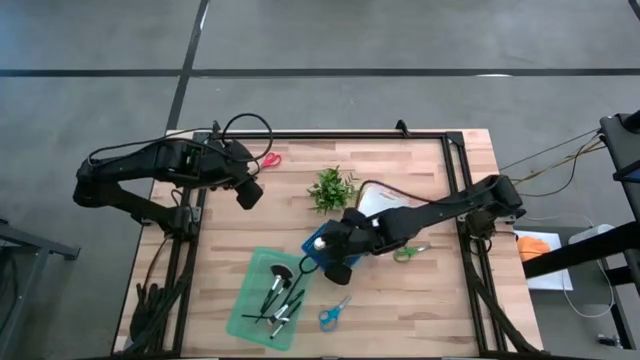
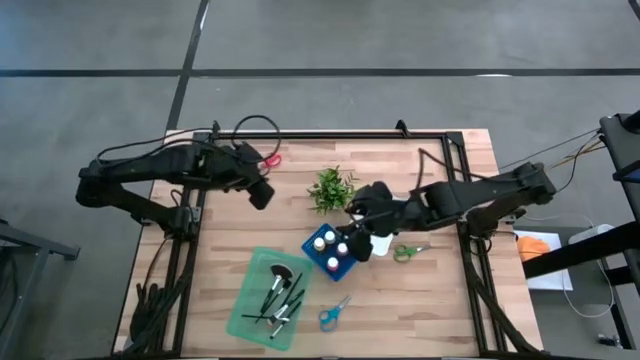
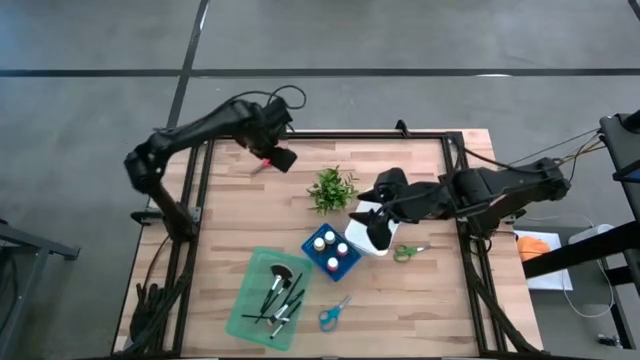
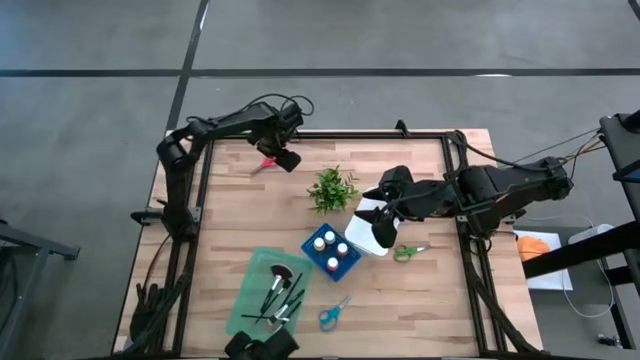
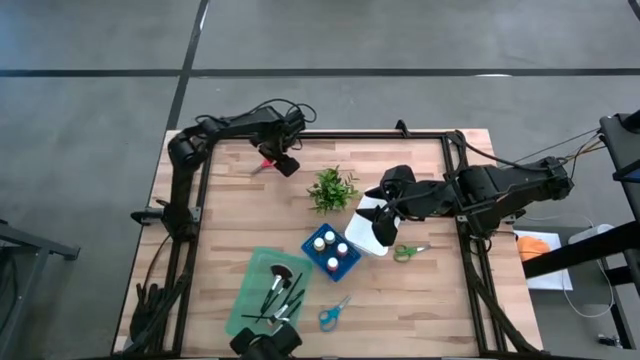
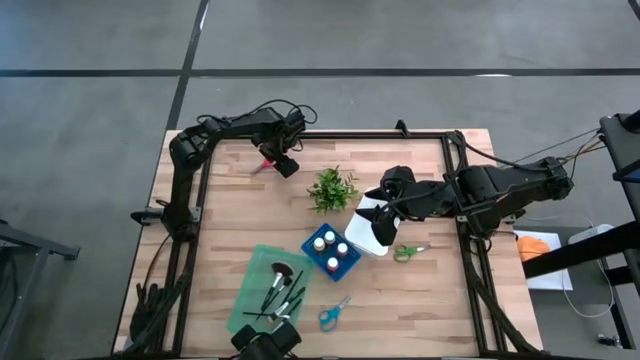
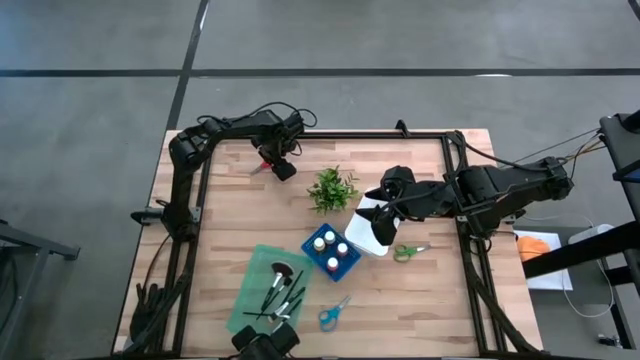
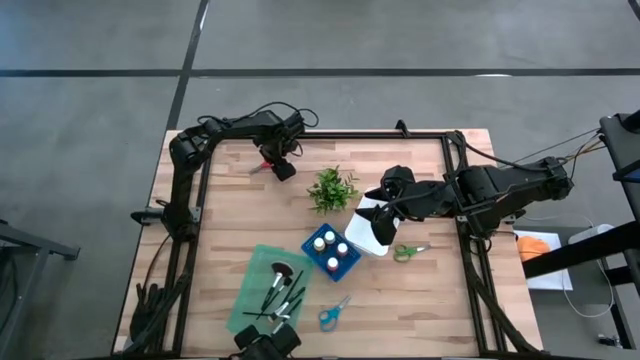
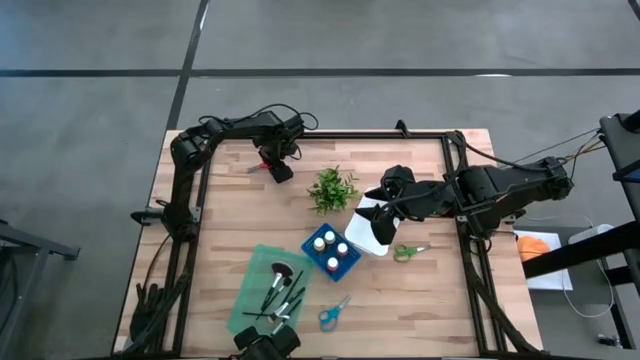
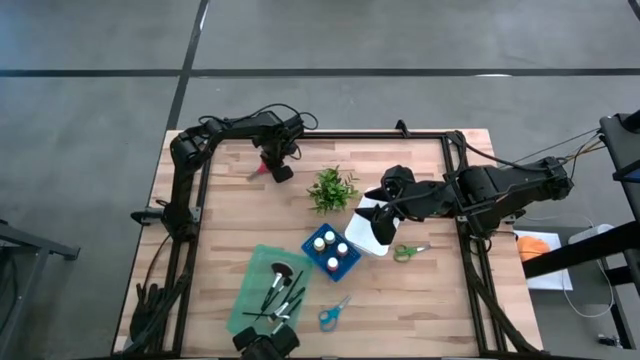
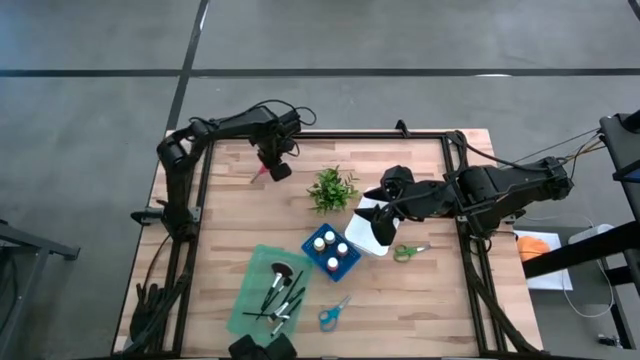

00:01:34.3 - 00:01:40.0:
Task: Pick & Place Paint Supplies
Put the orange scissors into the white bin

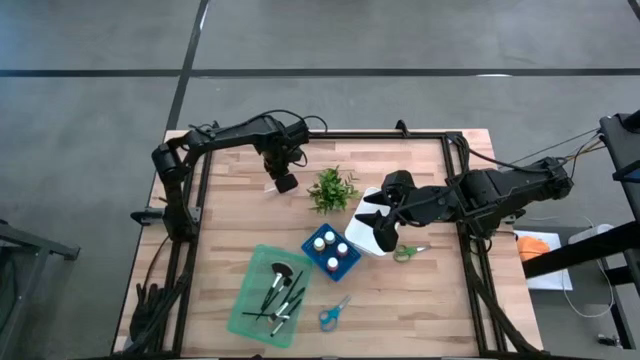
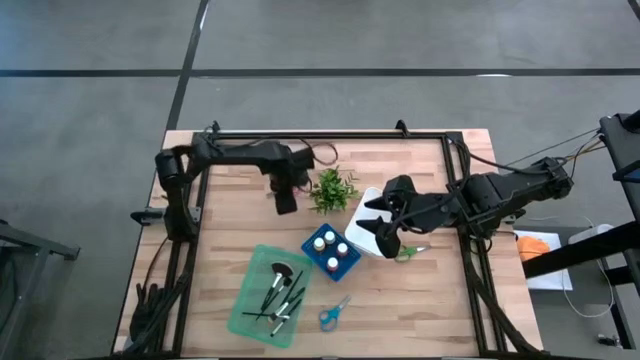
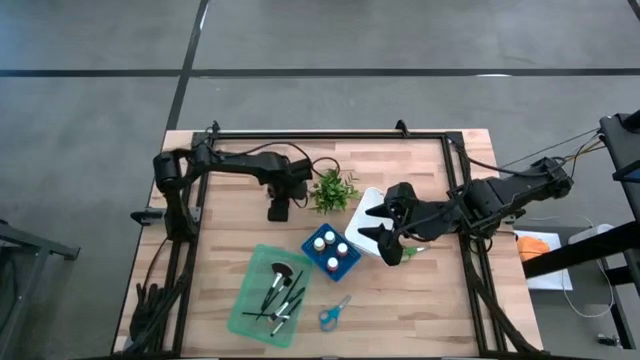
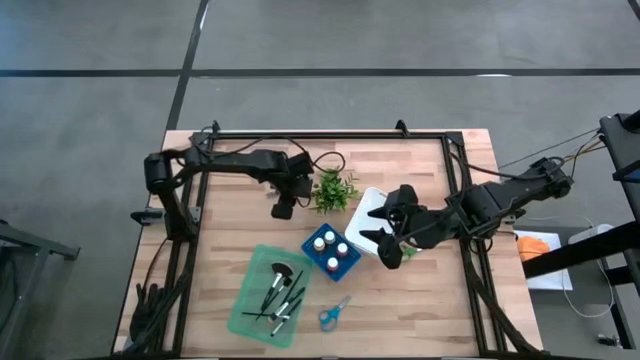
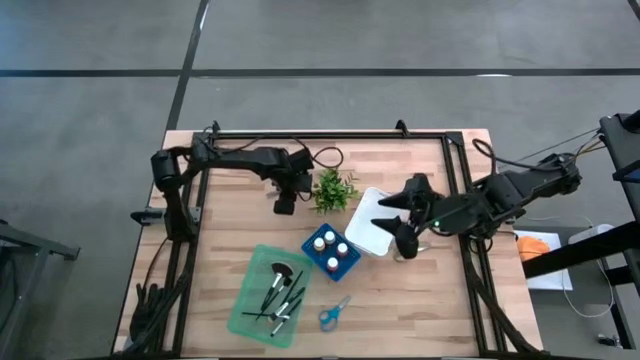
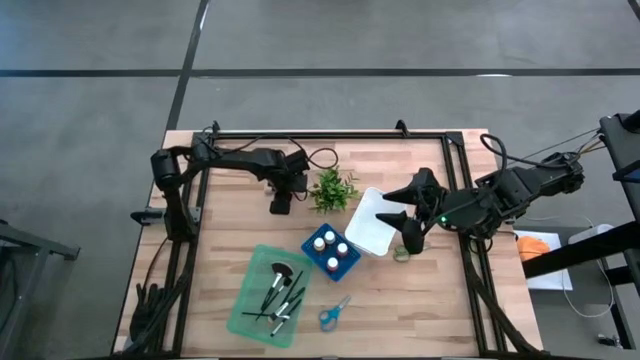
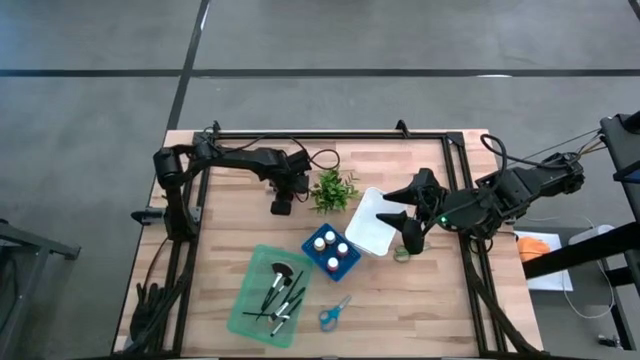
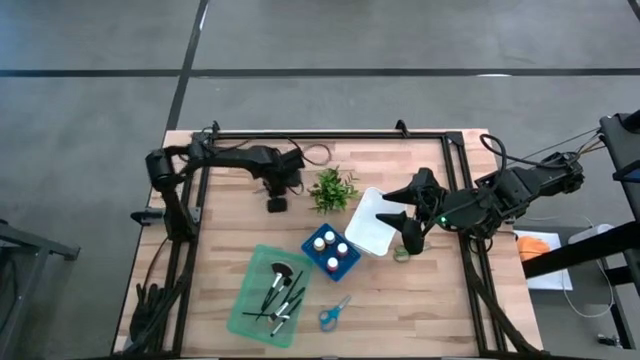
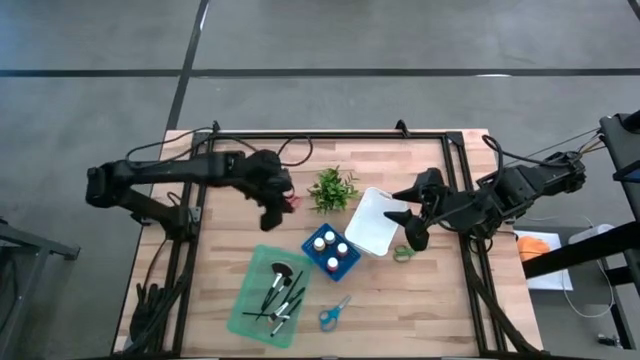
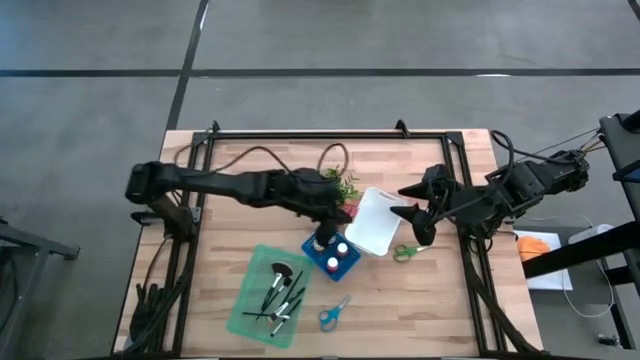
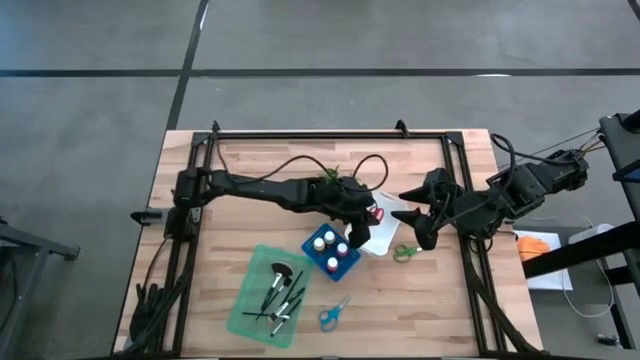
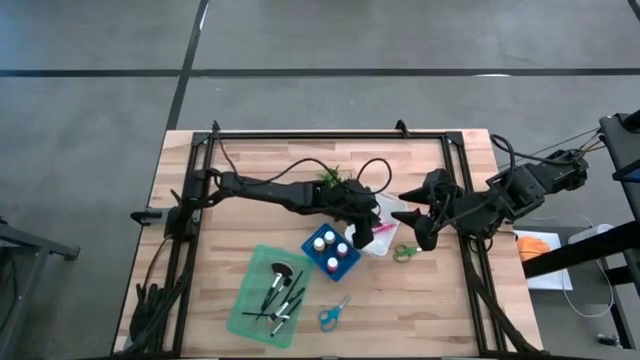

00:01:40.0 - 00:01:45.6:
Put the orange scissors into the white bin

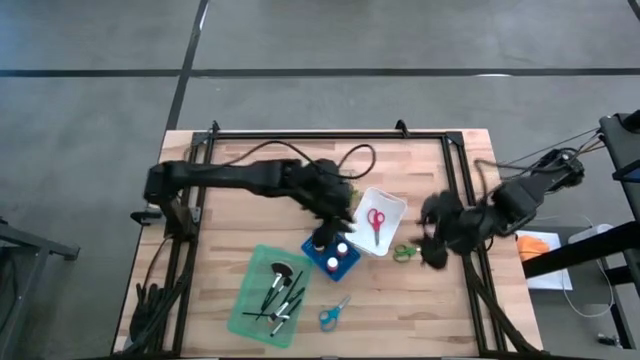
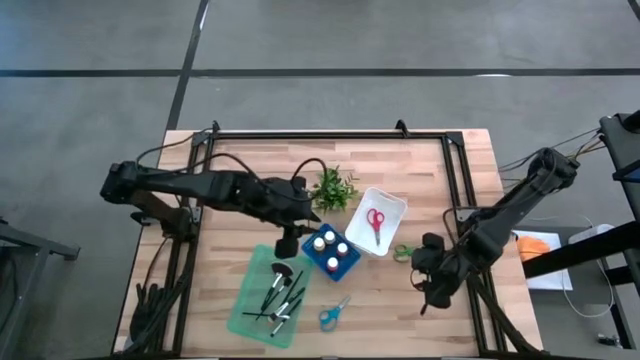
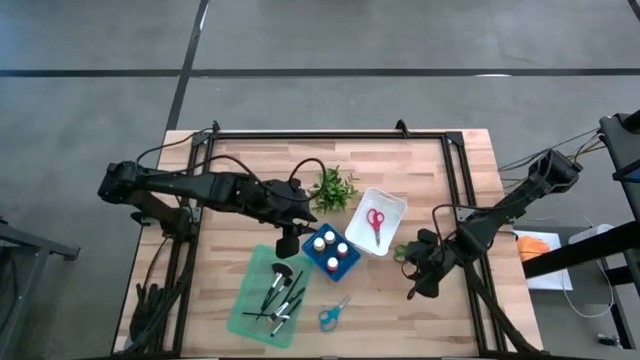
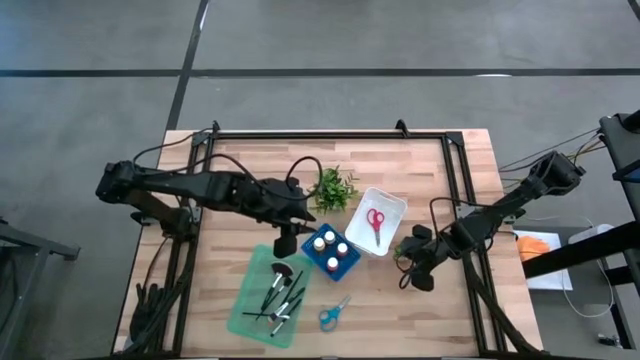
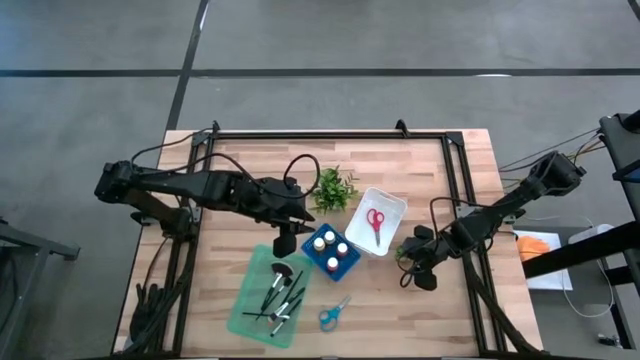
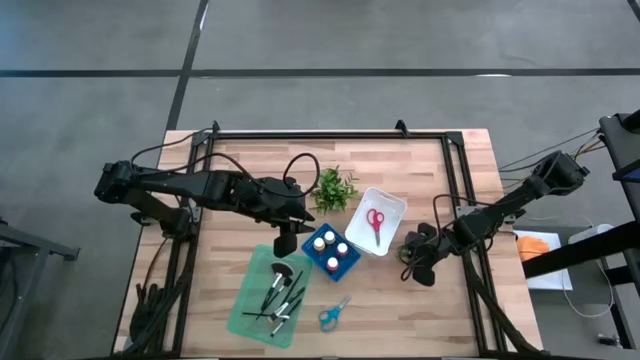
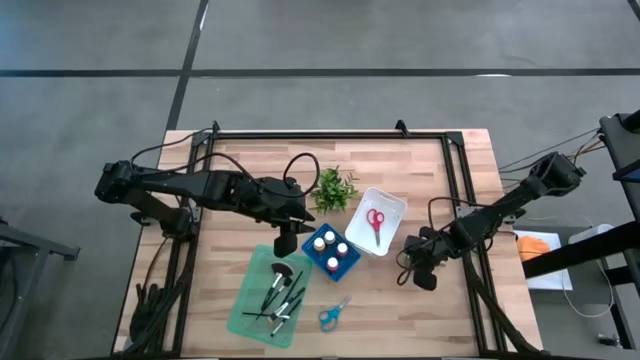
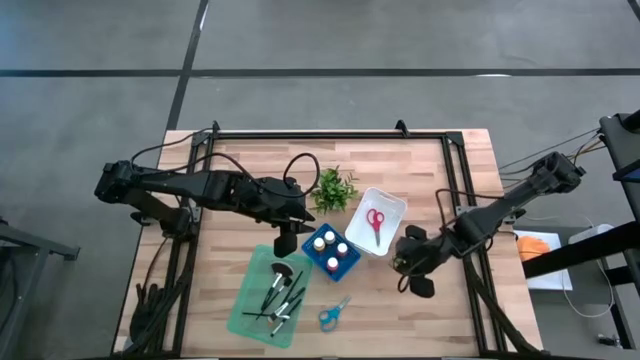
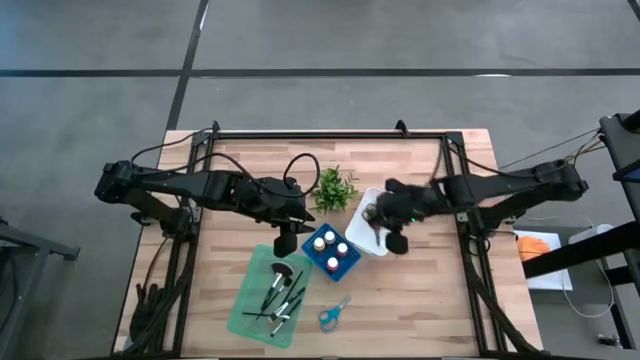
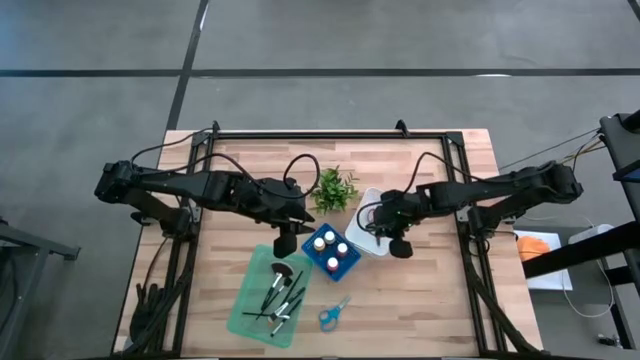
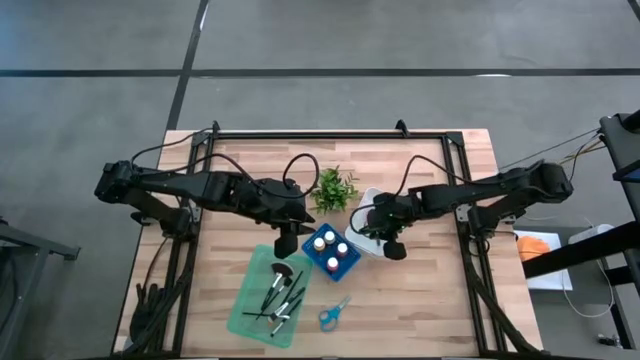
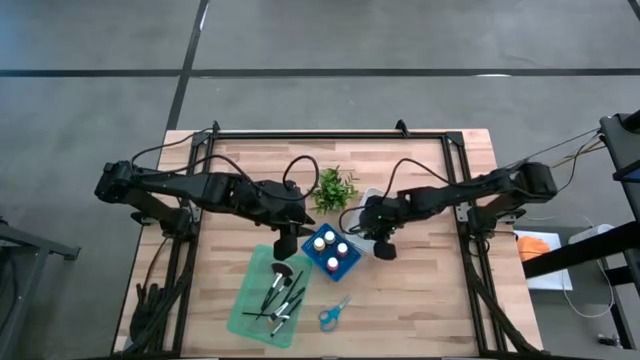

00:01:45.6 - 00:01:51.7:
Put the green scissors into the white bin

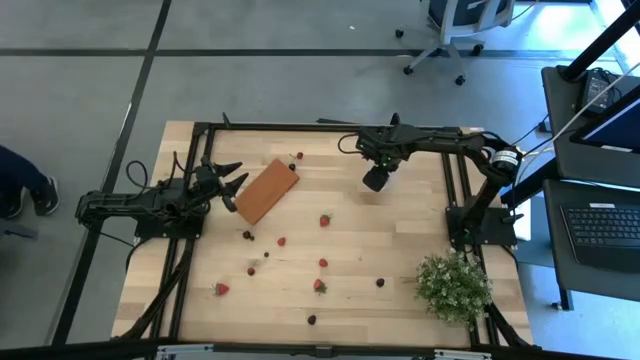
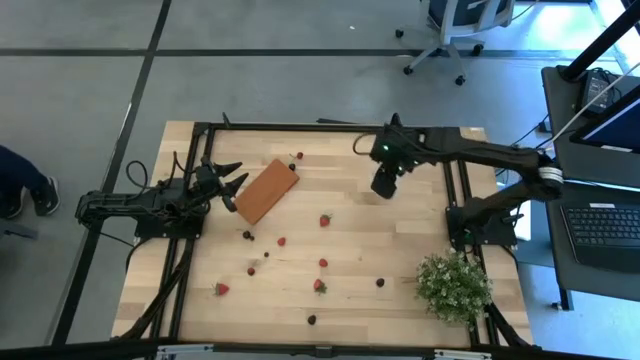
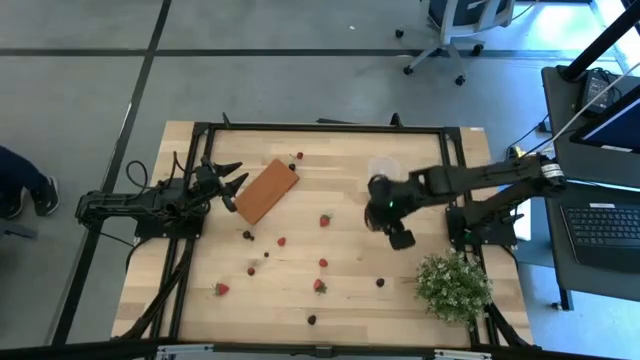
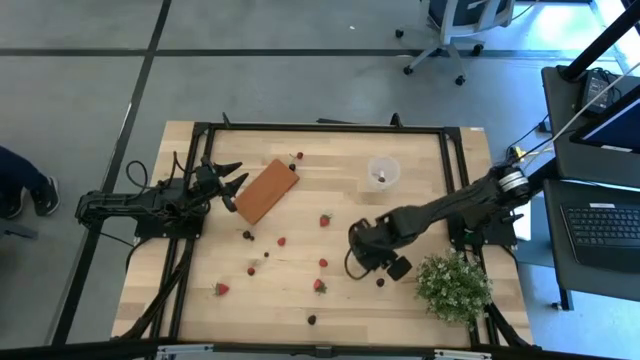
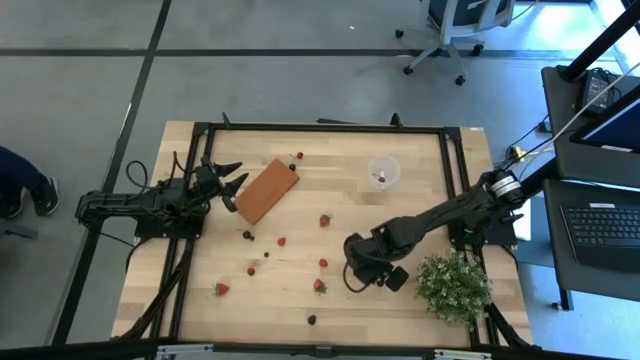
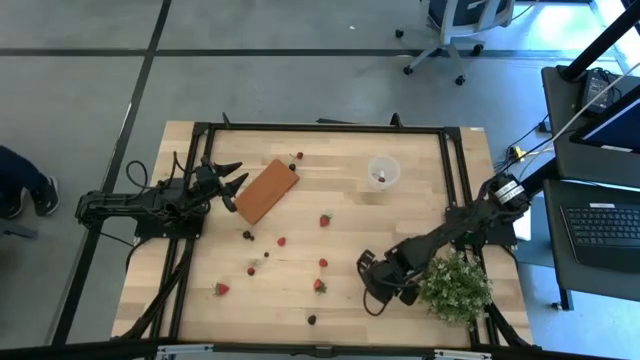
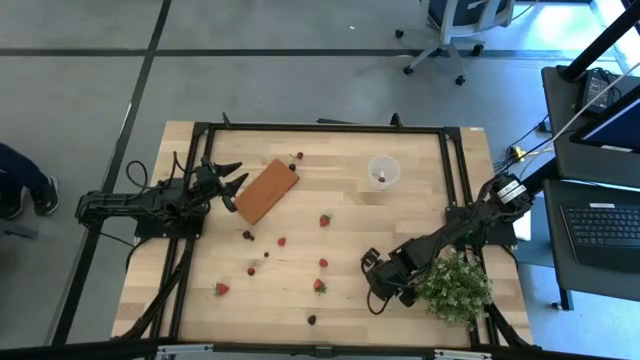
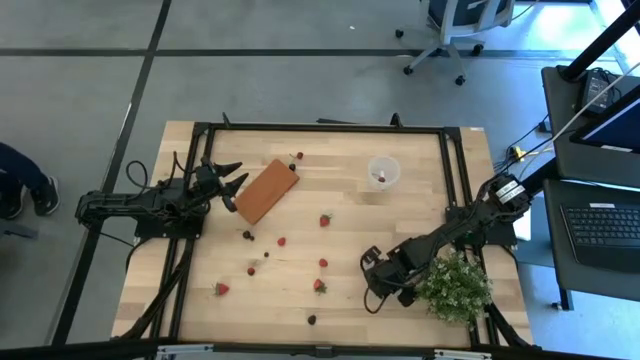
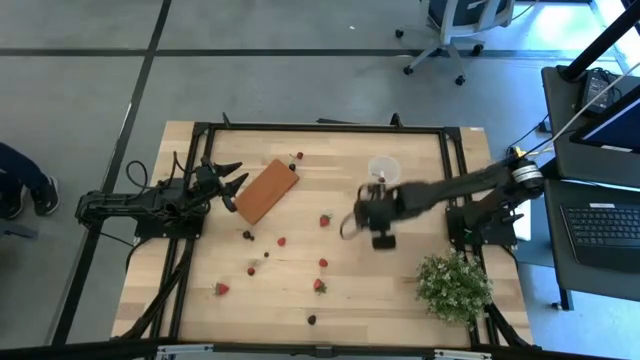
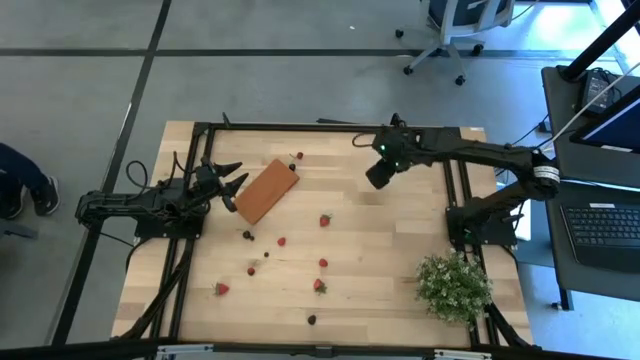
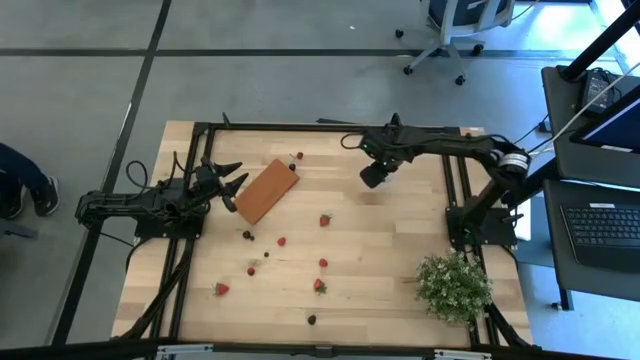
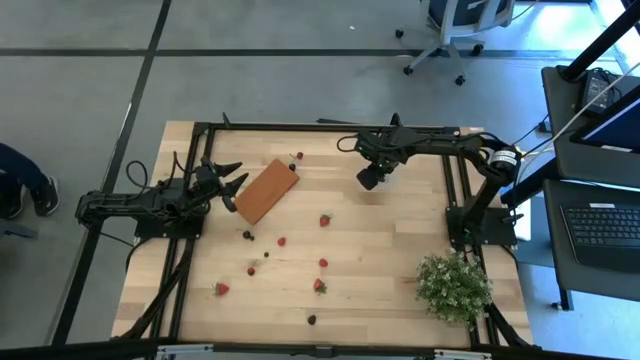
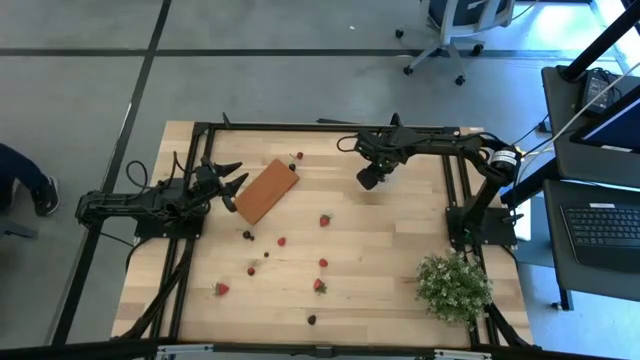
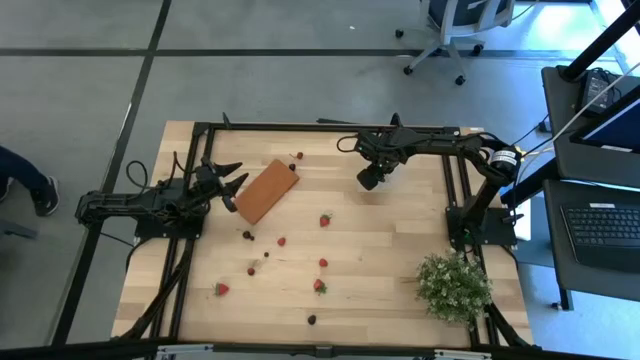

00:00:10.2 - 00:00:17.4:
Task: Pick and placing Produce into tupperware
Put the top blackberry into the transparent container
